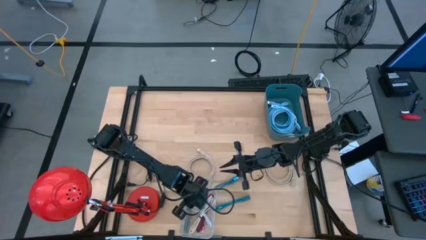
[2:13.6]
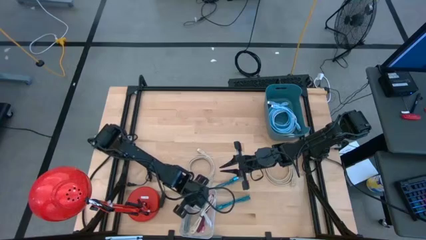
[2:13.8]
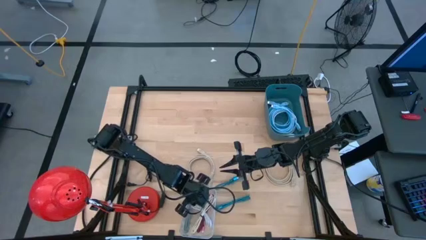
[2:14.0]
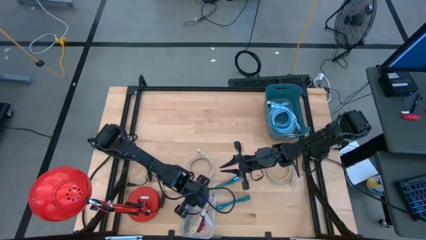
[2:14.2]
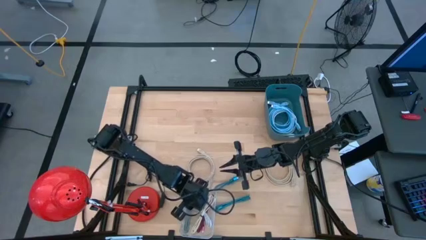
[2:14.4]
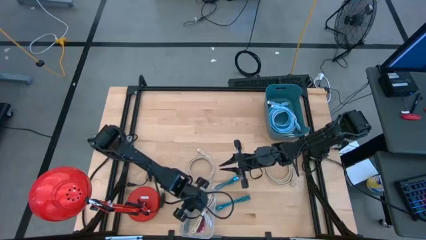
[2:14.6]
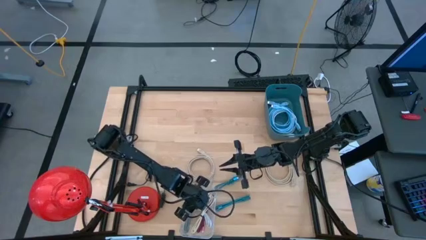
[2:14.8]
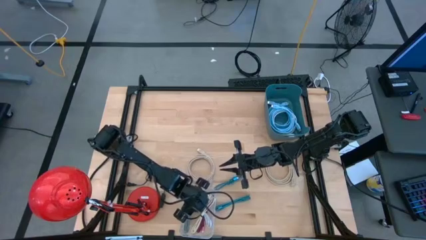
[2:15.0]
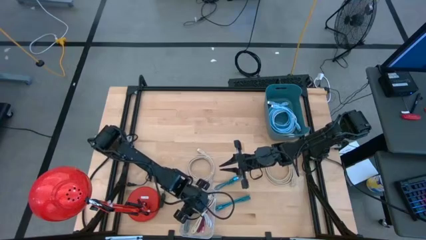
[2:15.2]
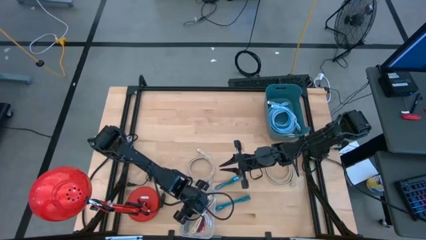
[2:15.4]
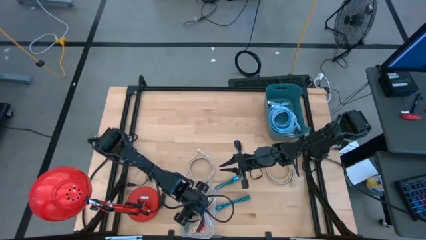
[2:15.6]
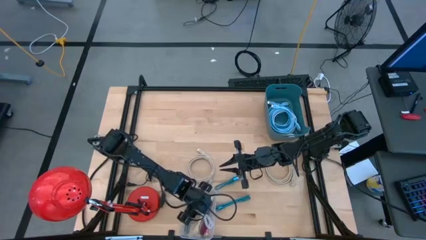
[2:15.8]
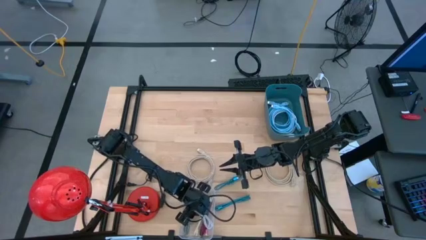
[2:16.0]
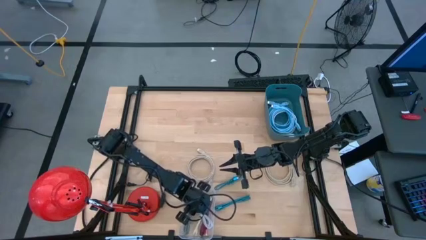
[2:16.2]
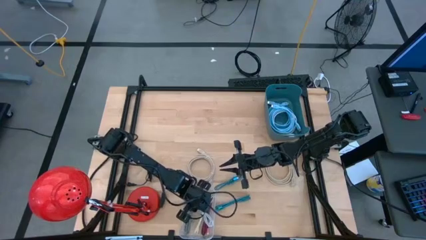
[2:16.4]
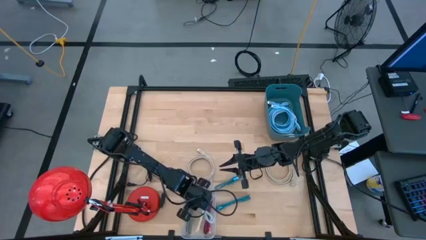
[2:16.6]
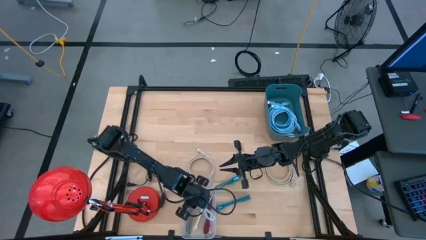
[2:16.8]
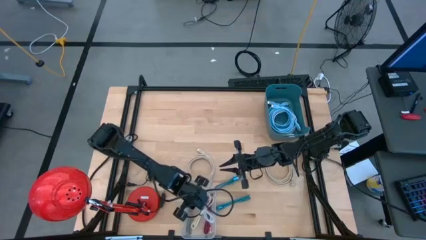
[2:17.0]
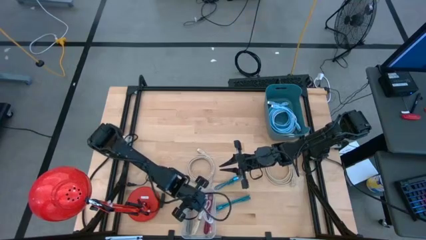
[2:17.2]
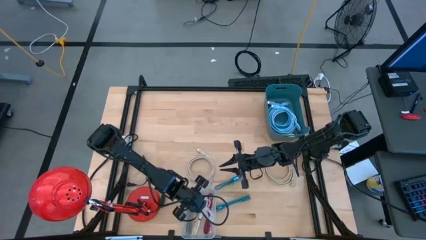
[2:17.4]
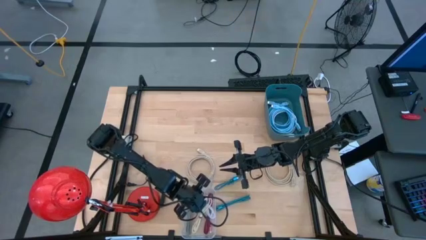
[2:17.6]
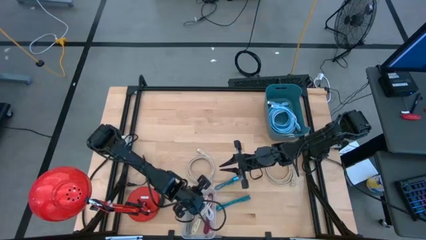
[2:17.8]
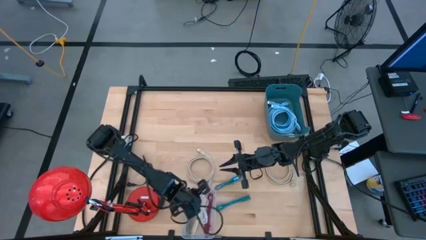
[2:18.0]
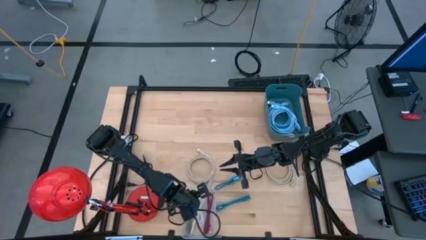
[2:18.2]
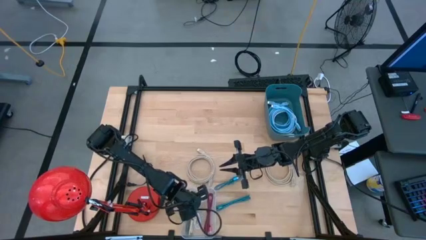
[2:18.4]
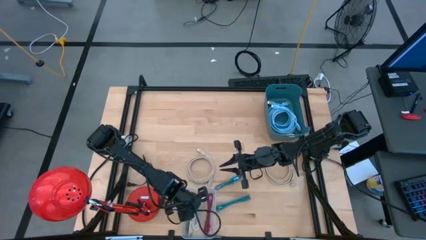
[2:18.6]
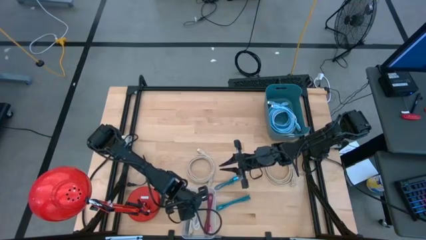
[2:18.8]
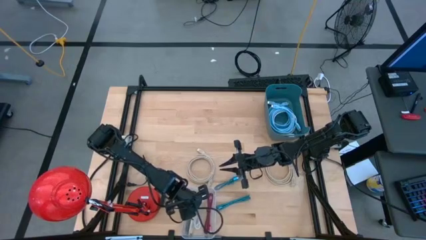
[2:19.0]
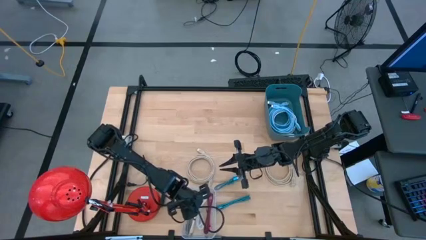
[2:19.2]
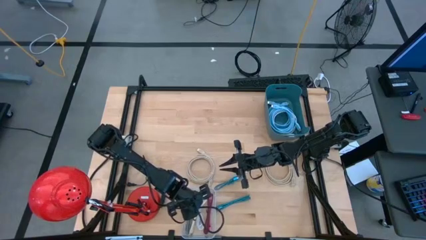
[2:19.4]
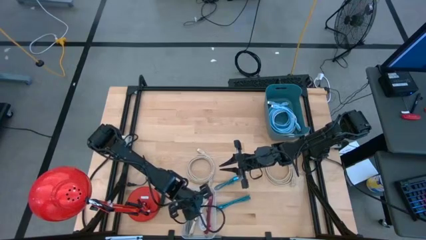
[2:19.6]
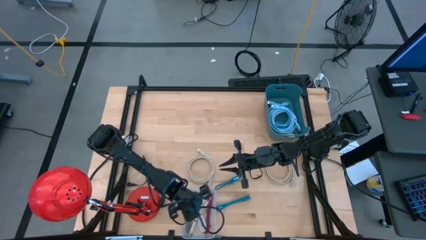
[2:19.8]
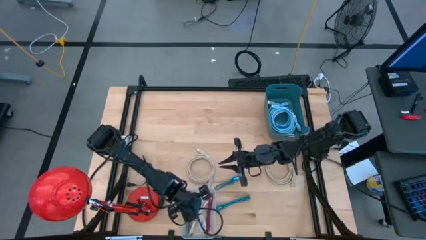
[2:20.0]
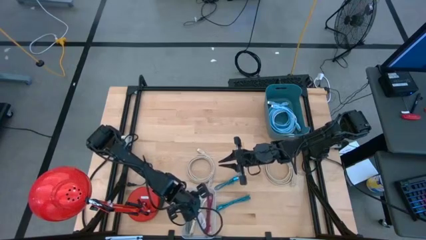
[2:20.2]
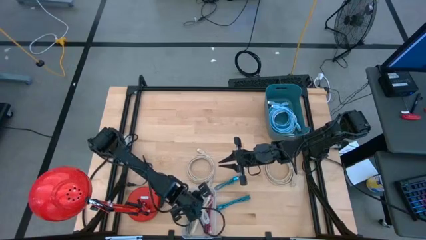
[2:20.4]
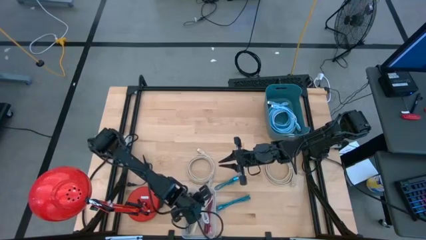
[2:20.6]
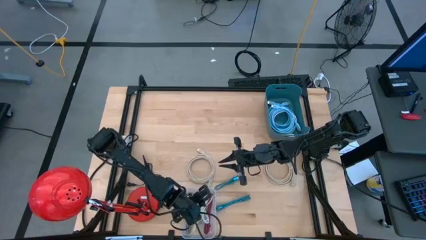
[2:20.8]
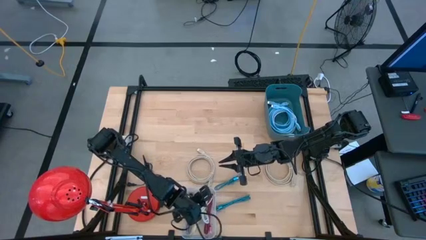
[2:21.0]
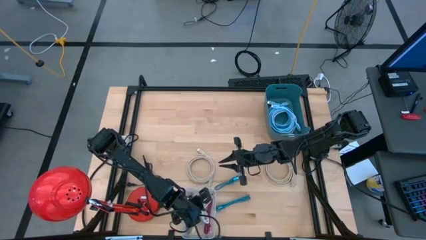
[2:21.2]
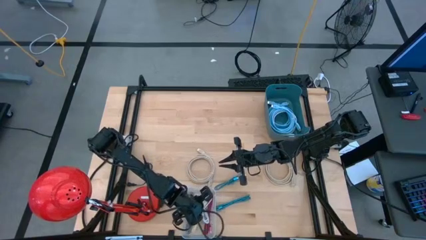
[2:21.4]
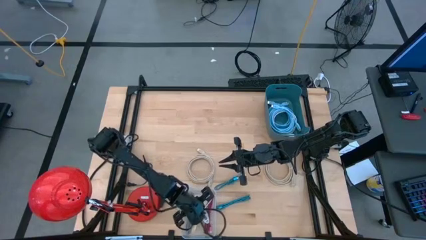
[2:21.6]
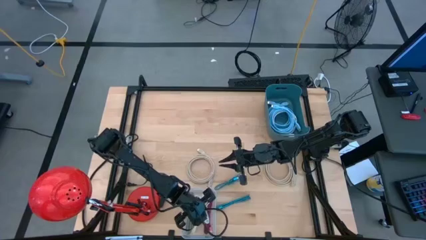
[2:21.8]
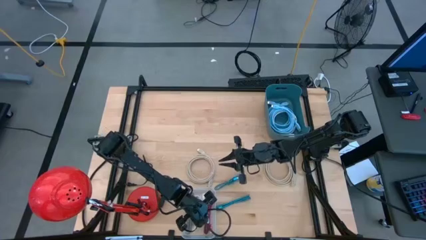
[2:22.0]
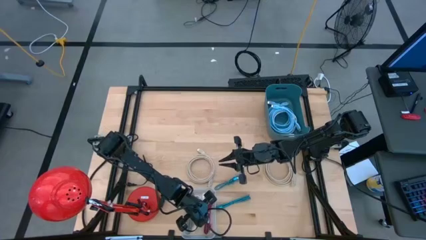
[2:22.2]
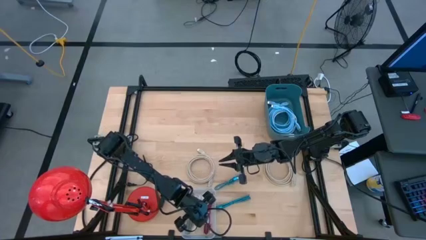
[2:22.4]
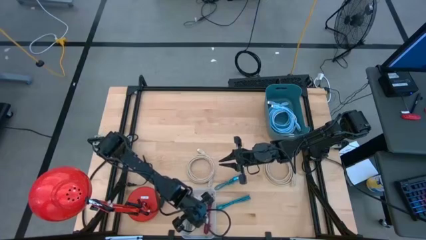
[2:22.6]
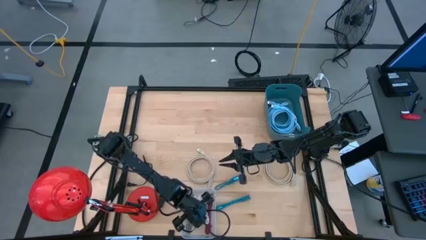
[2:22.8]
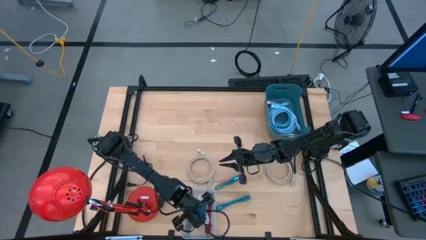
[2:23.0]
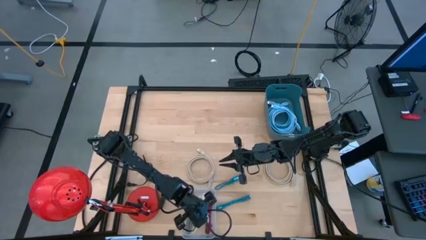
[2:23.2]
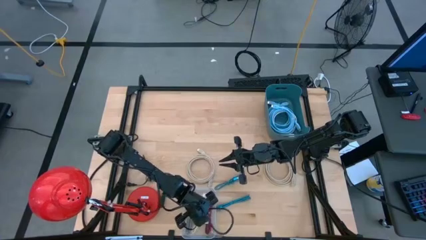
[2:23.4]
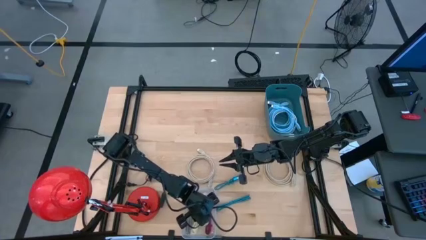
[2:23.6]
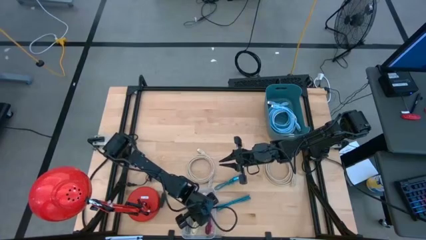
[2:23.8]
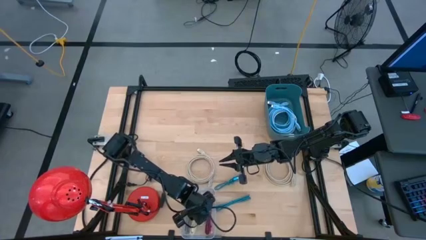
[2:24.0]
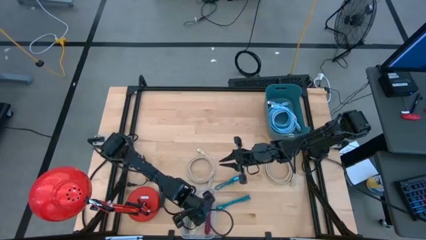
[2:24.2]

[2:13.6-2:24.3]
Task: Pick & Place USB Port
Adjust the white charger cable in the transparent bin
